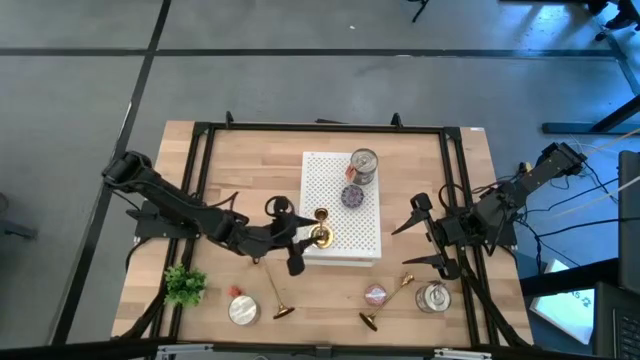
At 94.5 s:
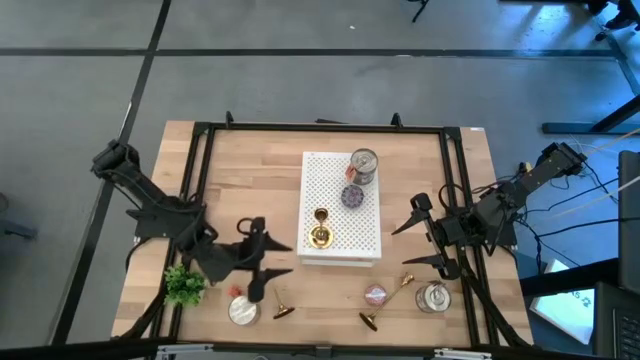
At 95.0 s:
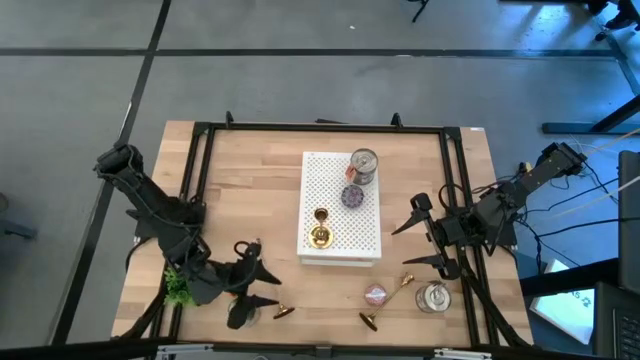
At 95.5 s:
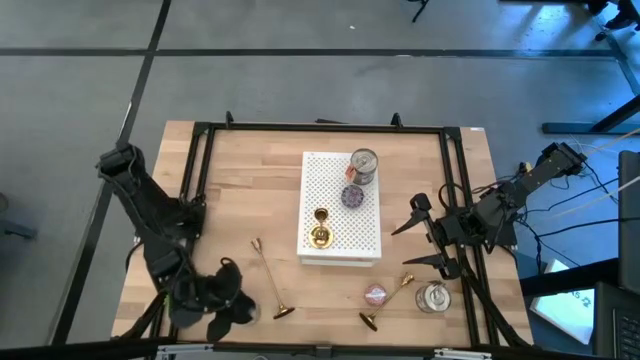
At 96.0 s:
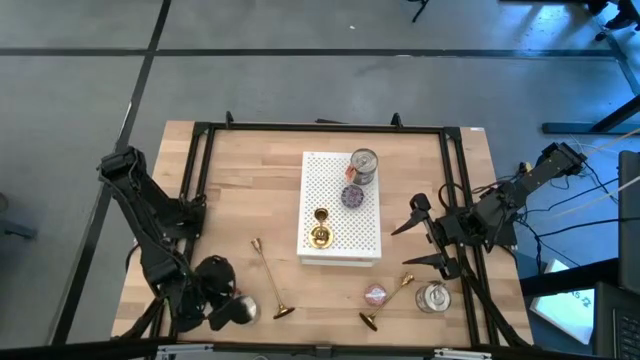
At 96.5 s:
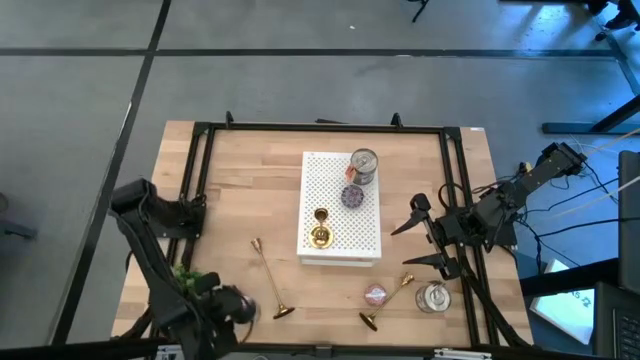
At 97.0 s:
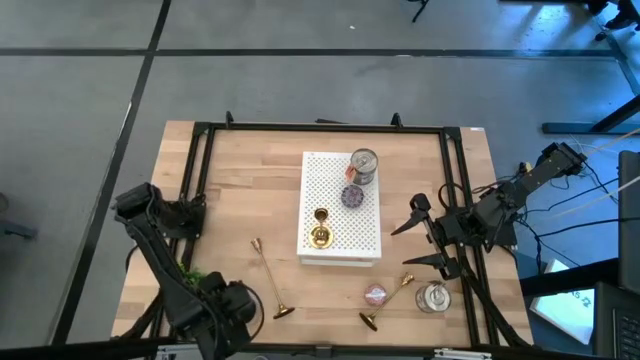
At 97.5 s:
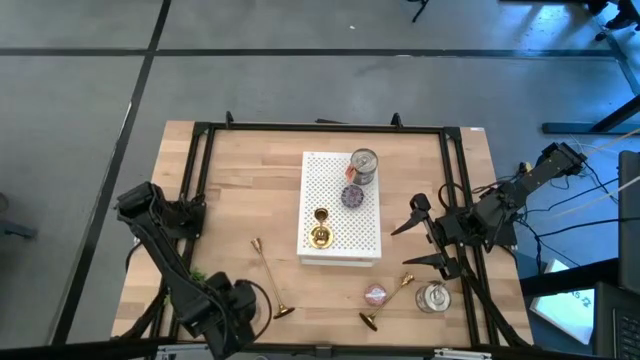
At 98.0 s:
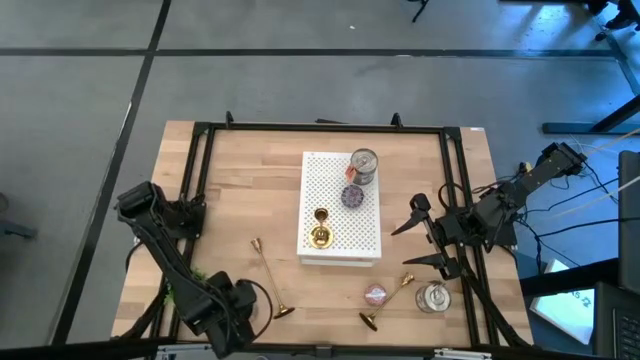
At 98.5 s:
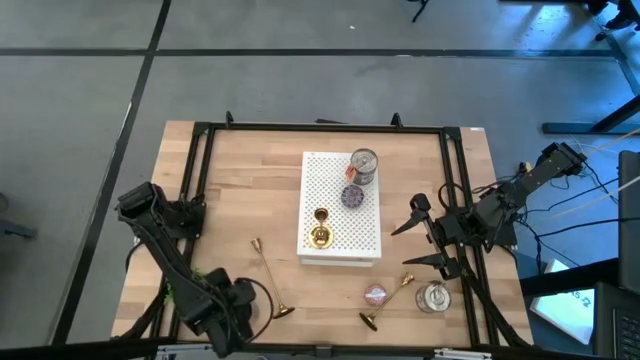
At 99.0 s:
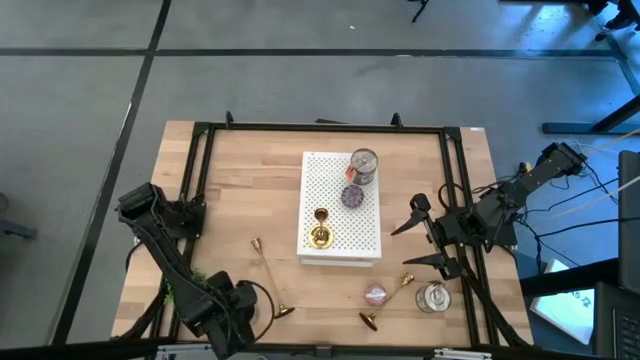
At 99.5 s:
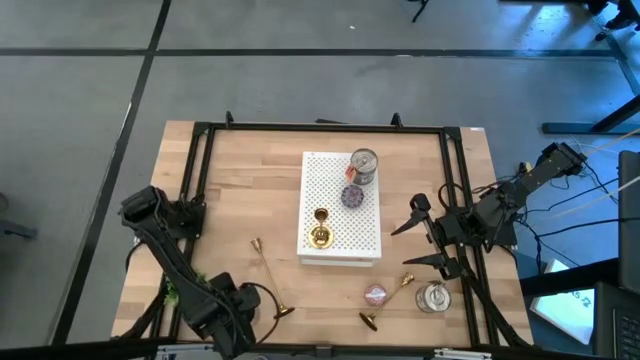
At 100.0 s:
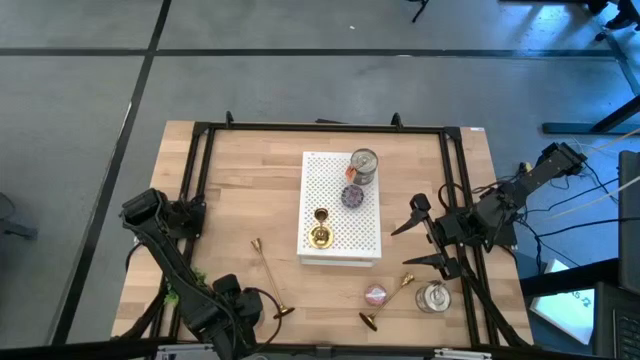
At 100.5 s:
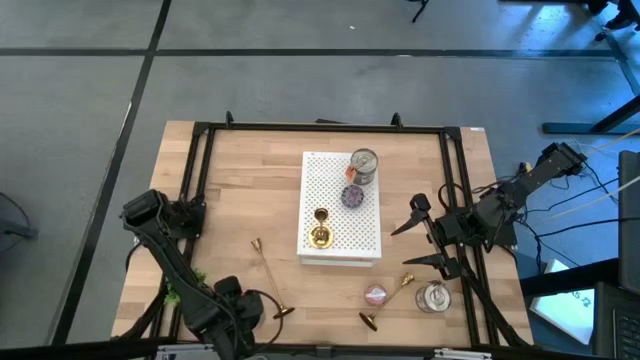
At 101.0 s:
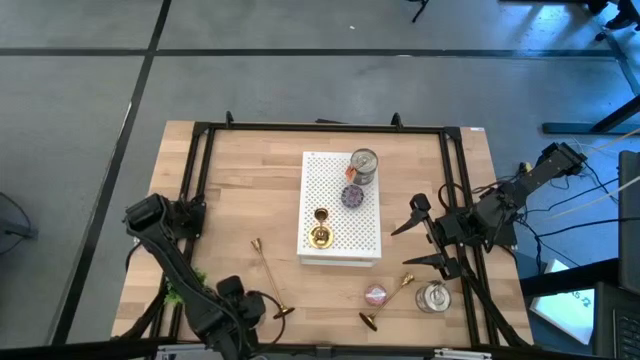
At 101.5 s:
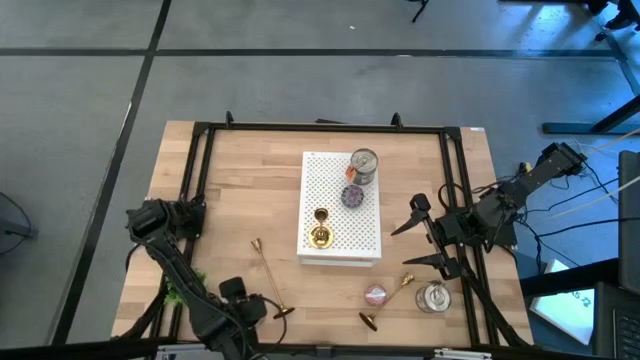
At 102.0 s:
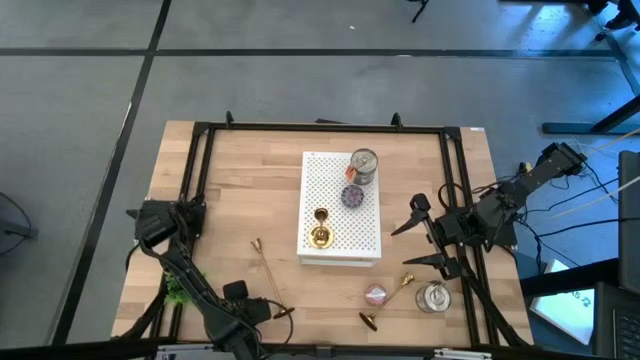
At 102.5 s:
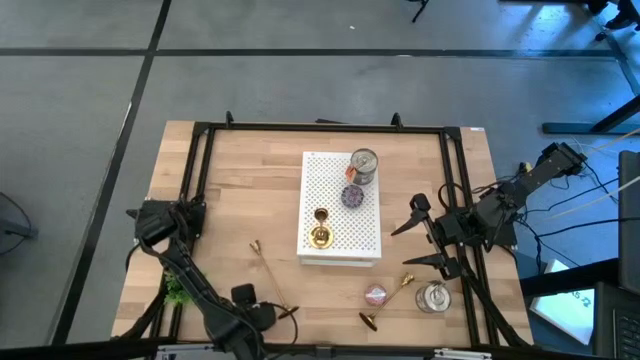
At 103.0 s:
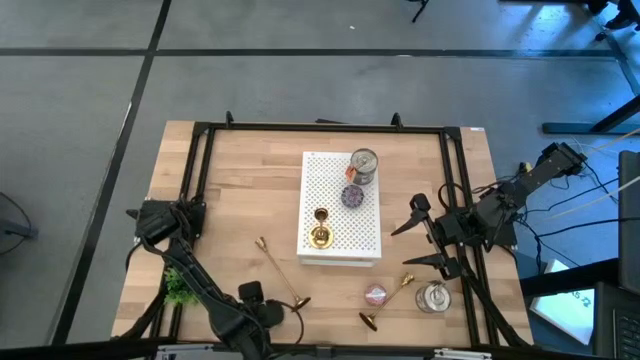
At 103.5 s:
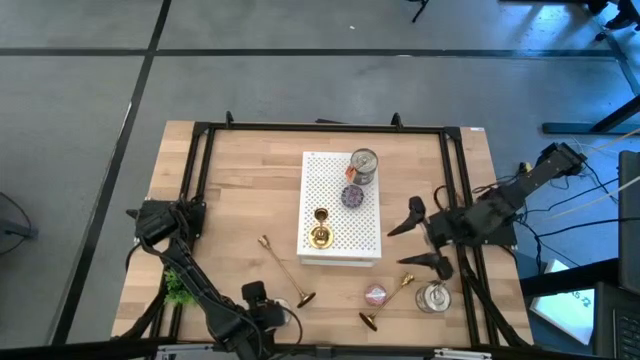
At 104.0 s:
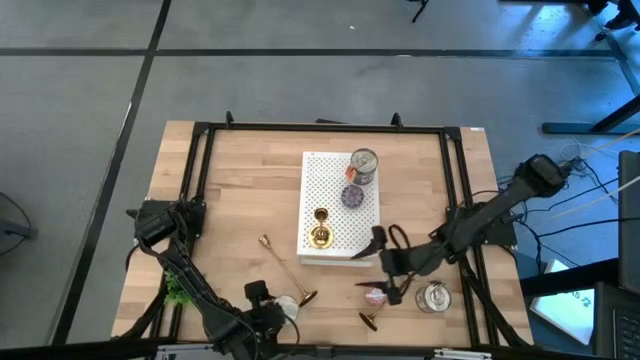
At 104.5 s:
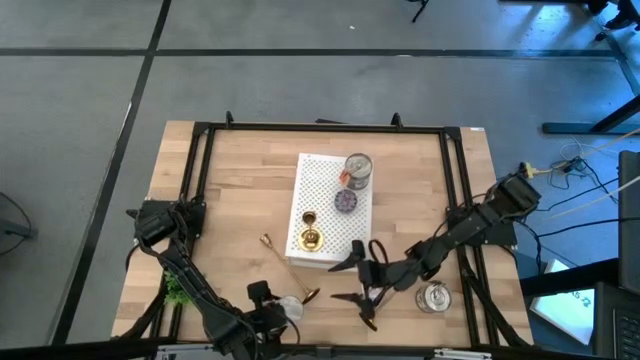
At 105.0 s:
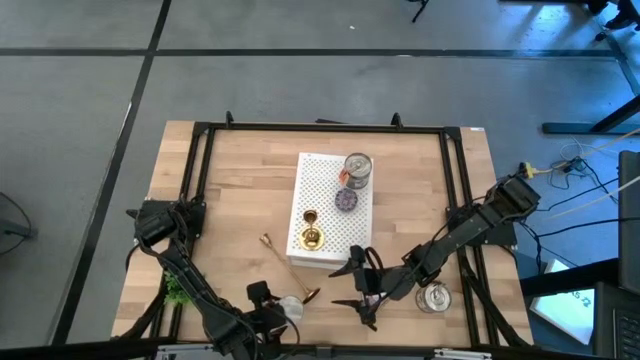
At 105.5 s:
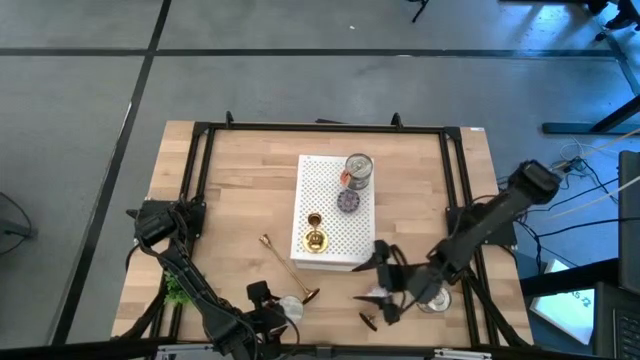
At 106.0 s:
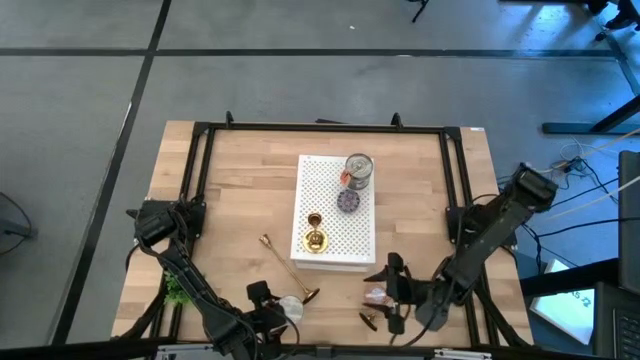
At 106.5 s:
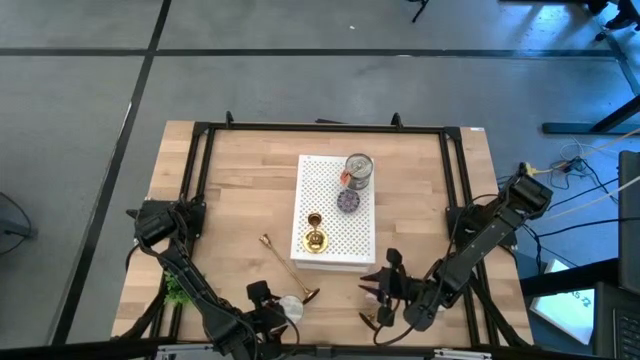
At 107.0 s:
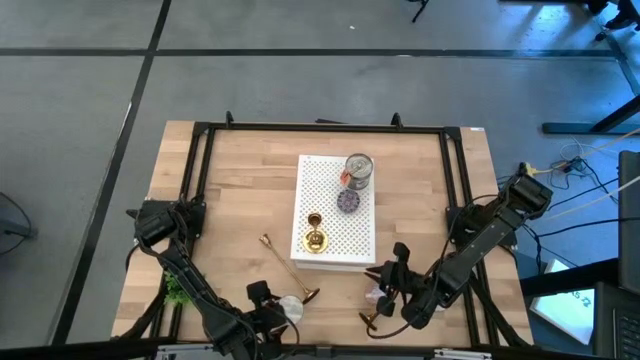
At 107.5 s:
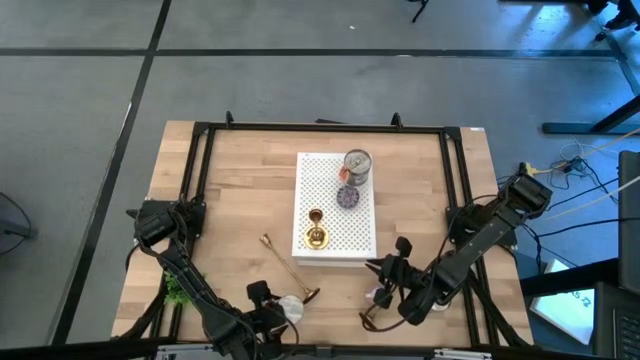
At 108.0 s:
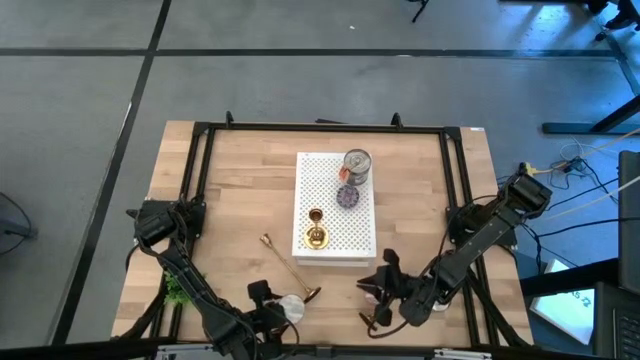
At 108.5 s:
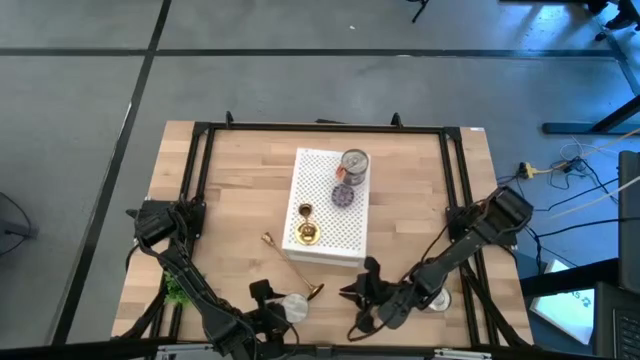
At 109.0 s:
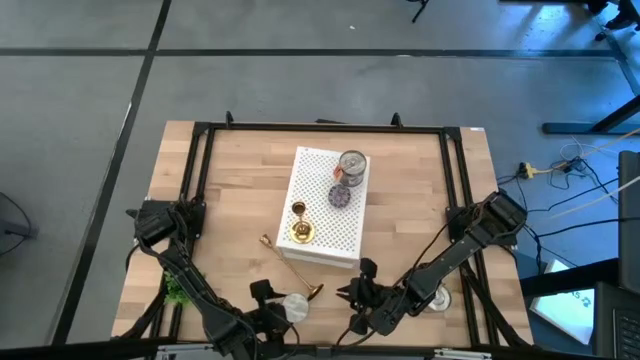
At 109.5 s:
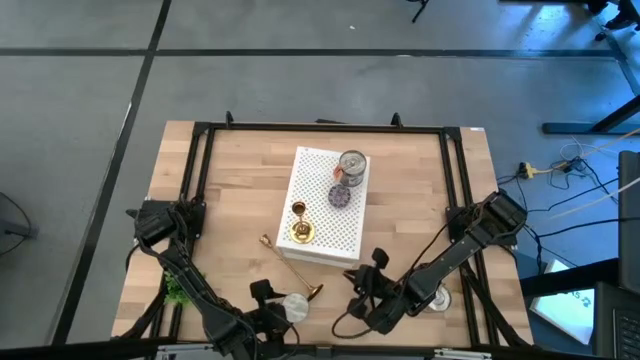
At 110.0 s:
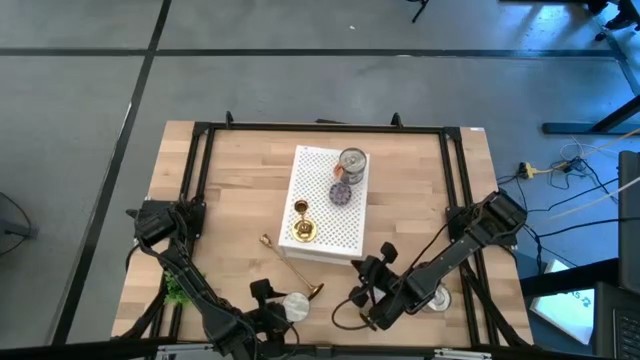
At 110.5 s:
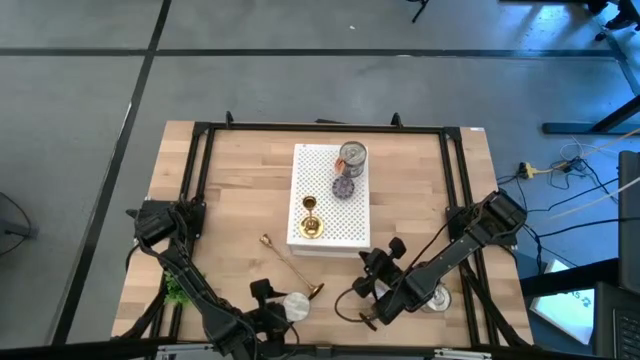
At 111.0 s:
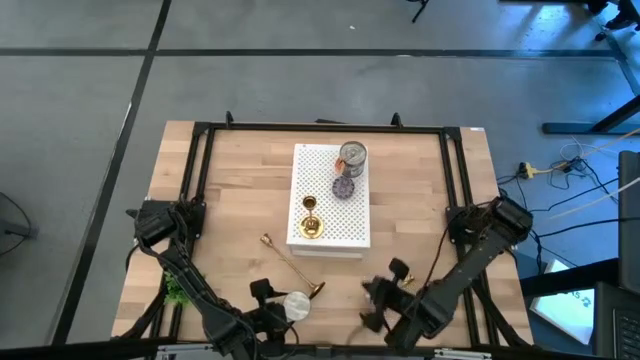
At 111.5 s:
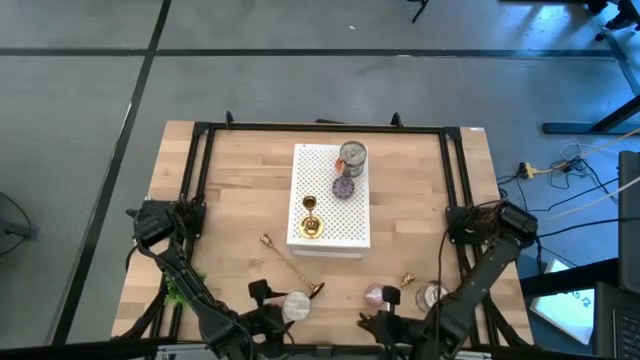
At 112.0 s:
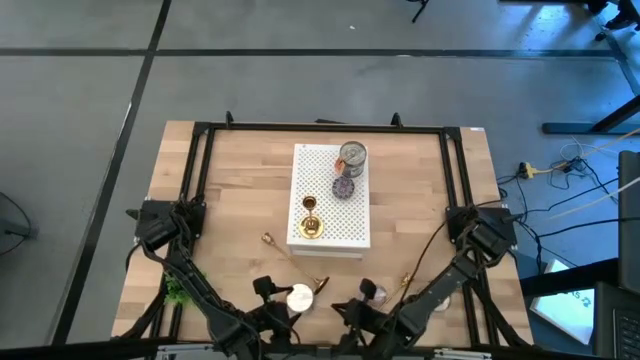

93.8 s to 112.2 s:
Task: Pick & Place candle stick holders
Put the left silver scented candle on the shelf

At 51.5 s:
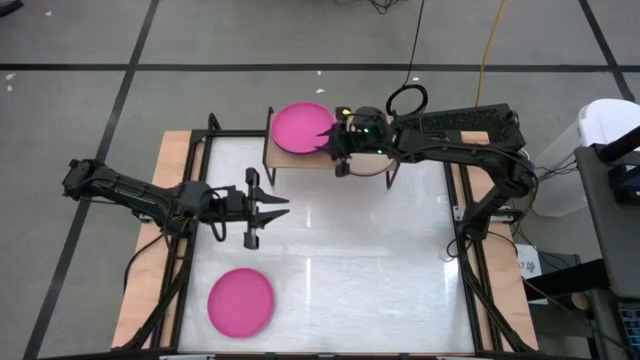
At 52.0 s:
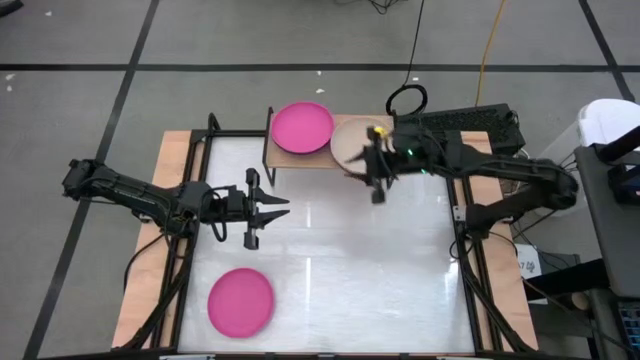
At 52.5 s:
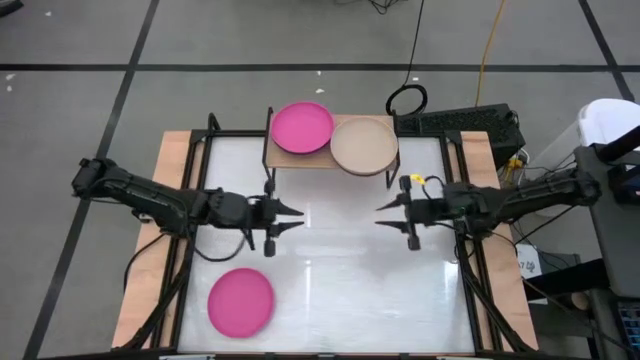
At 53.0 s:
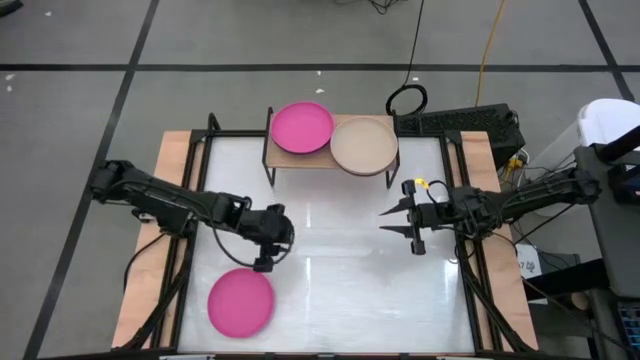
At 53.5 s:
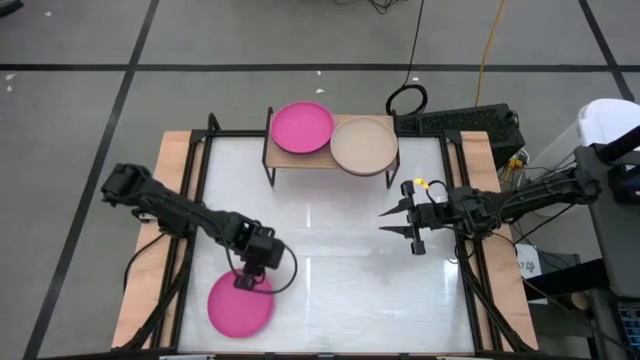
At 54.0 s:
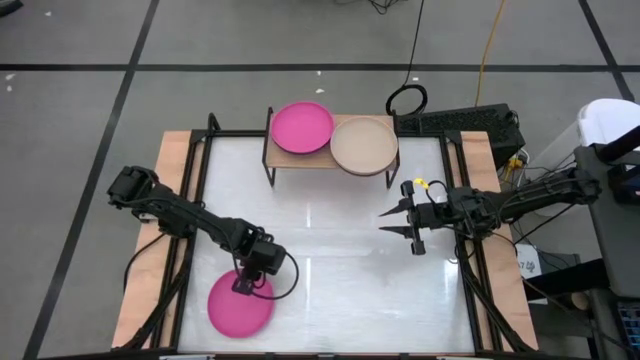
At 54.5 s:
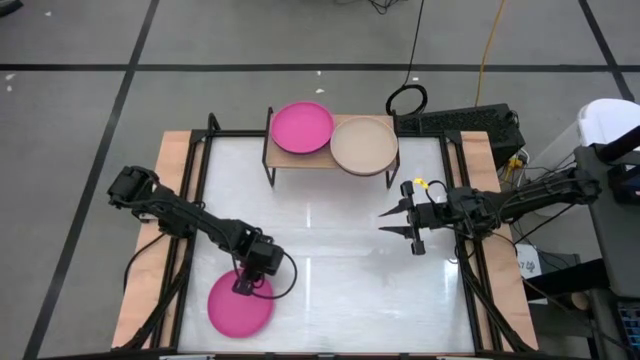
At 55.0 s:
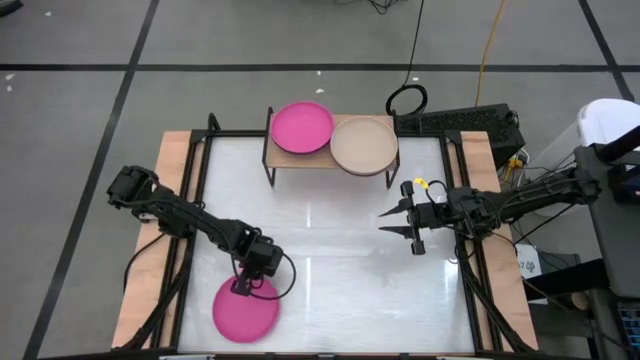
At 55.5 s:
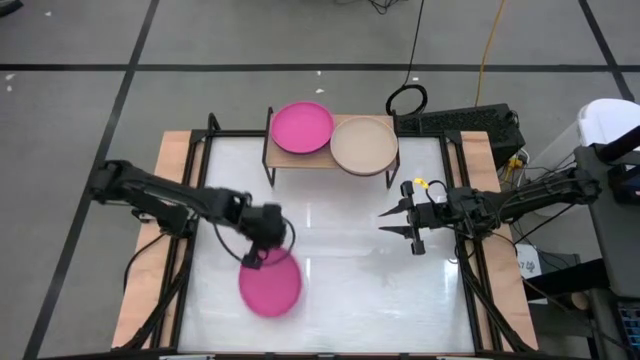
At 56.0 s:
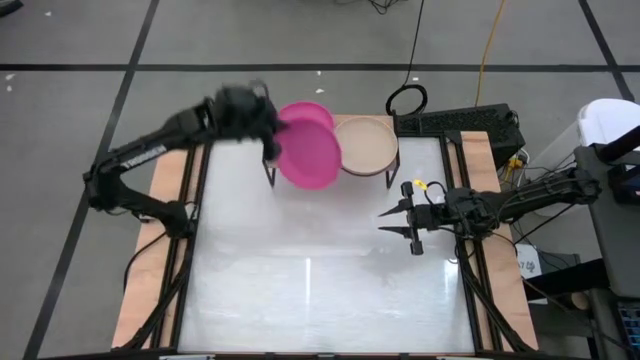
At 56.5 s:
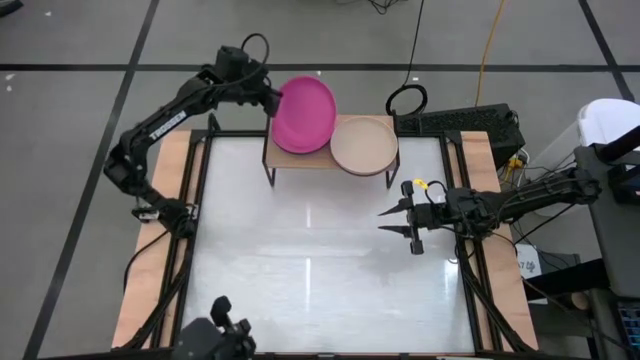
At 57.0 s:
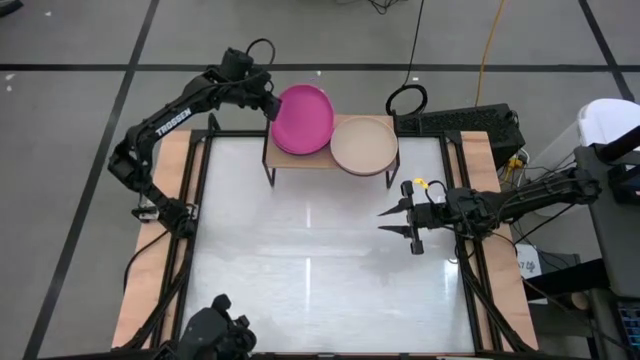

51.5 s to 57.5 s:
Task: Place and stack plates onto a shelf
Stack the pink plate on top of the pink plate on the shelf
